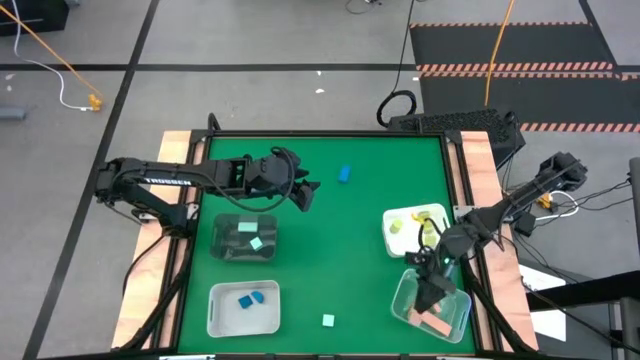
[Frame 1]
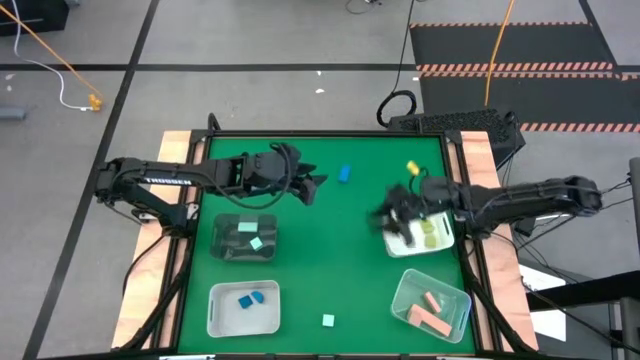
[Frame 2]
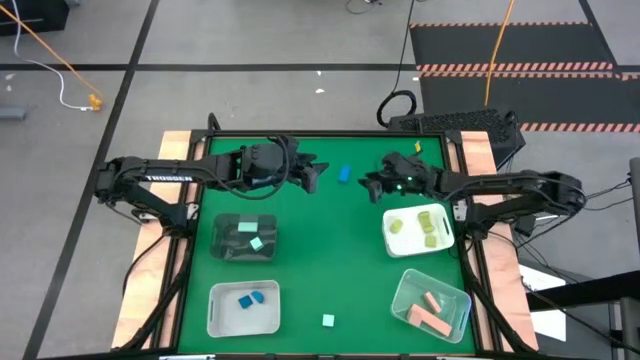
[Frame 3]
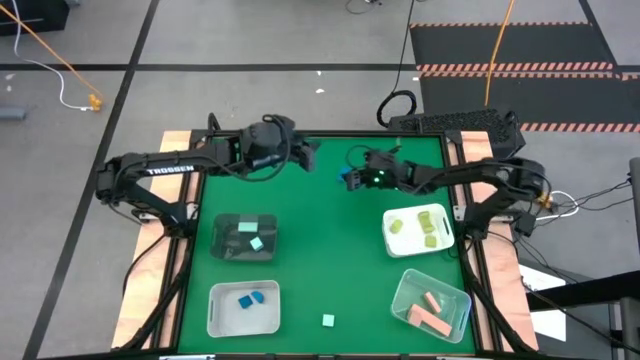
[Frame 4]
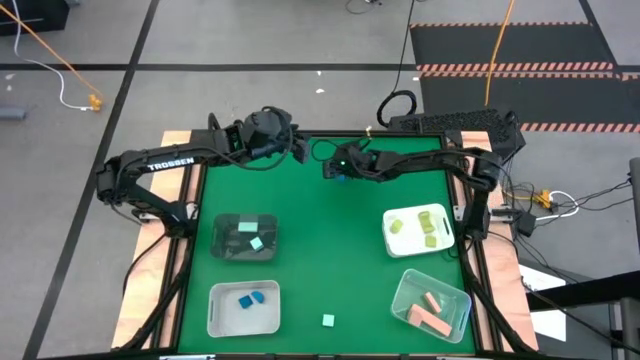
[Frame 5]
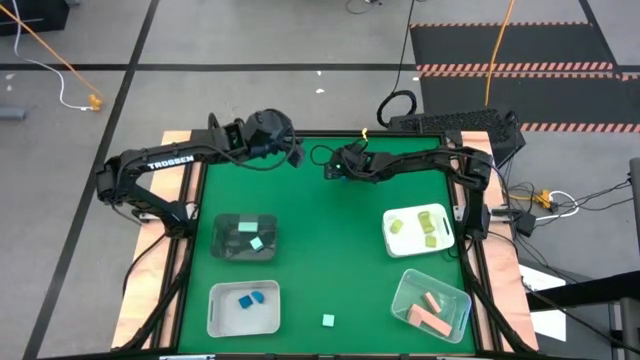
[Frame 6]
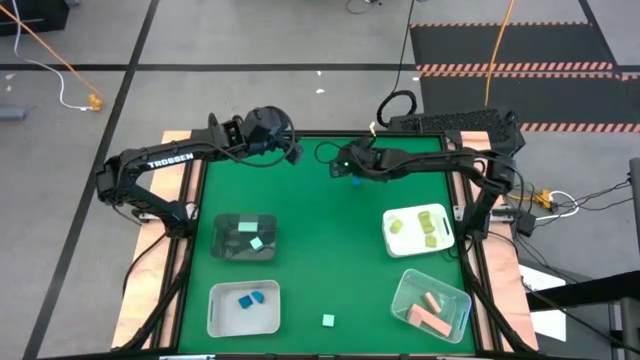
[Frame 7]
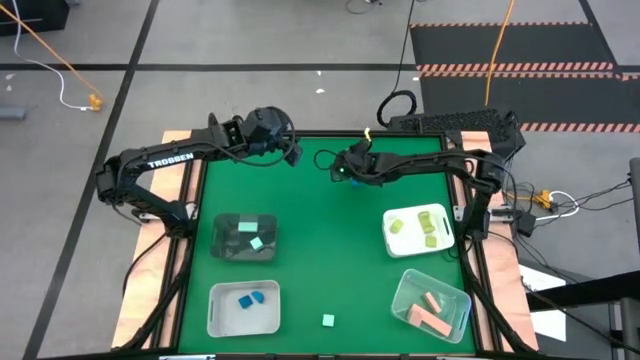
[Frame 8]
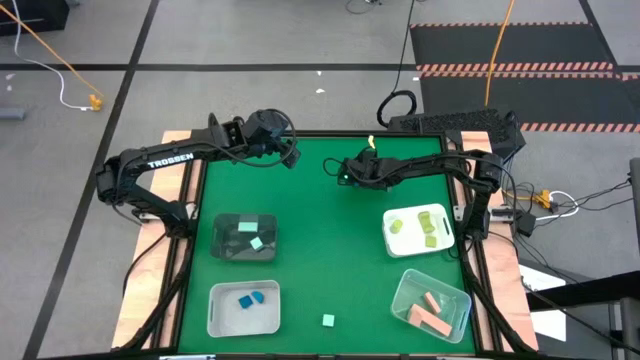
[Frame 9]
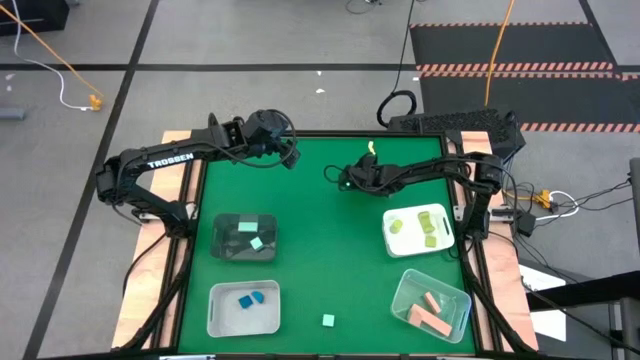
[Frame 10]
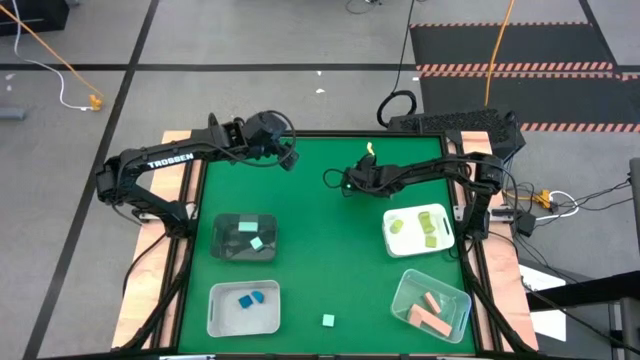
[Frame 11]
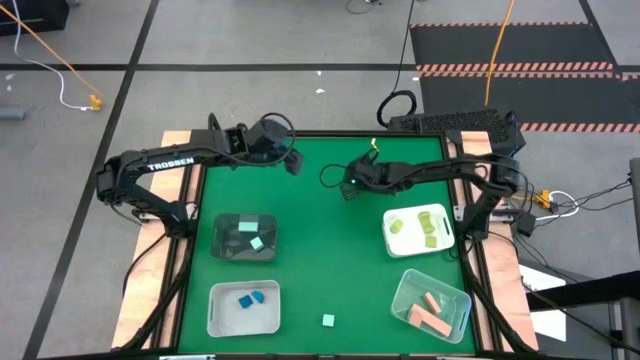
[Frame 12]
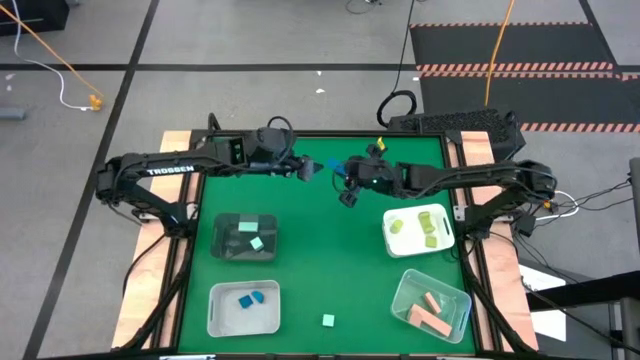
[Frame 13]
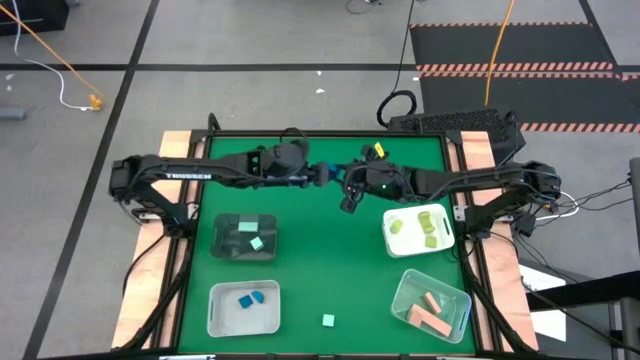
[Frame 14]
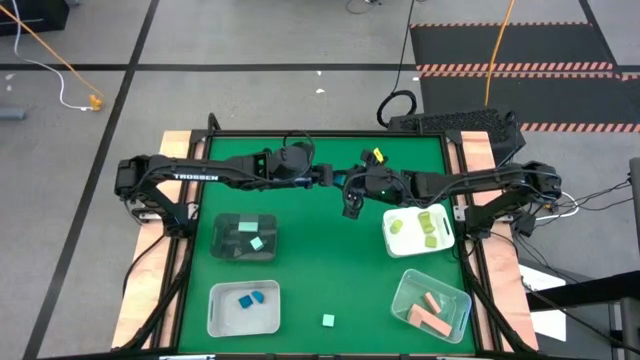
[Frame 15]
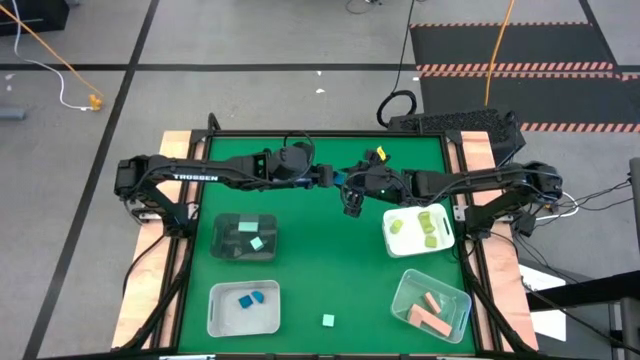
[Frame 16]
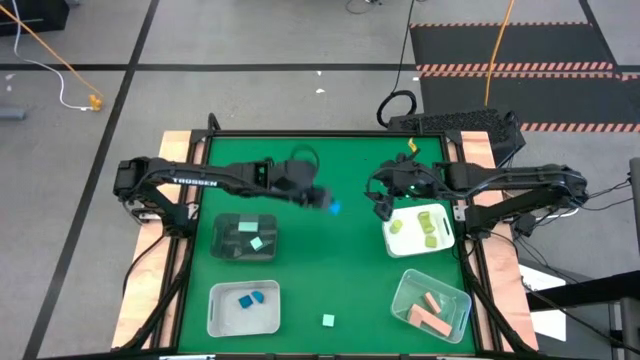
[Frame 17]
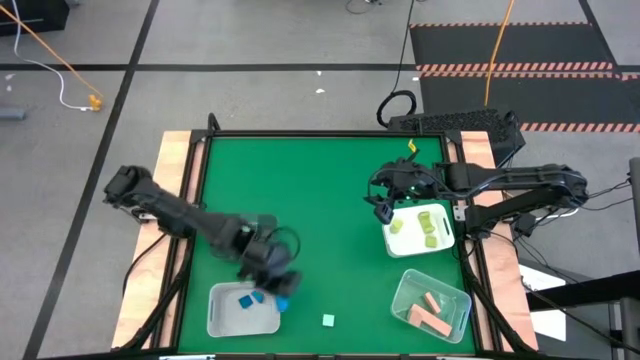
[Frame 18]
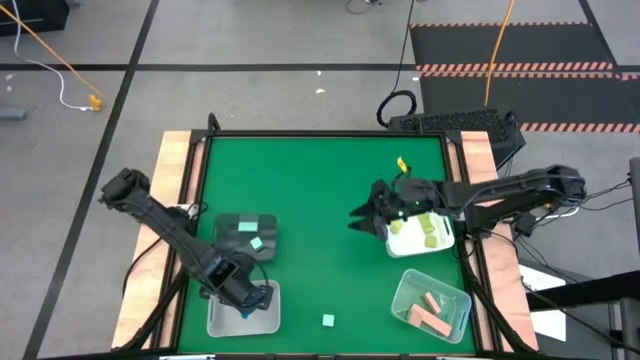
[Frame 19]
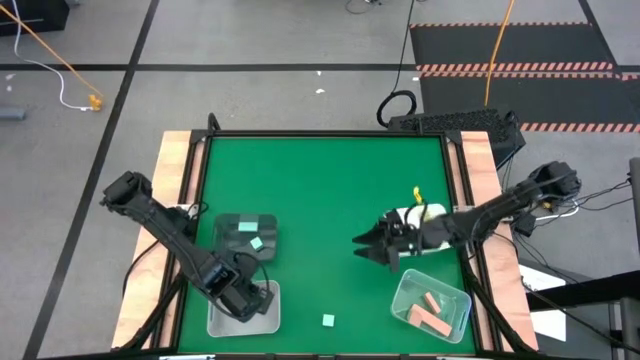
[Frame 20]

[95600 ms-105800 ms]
Task: Sort & place blocks by color
Put the blue block into the gray bin

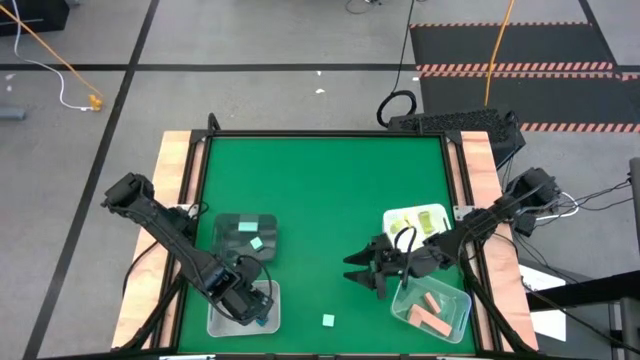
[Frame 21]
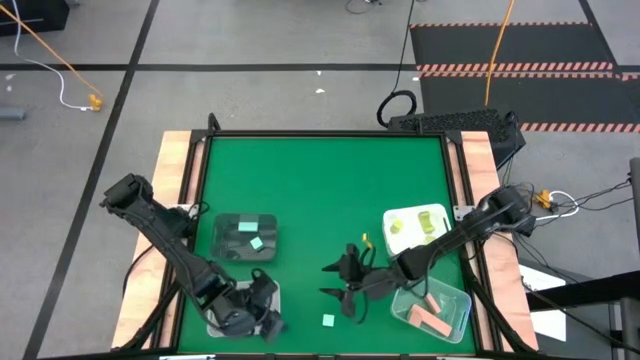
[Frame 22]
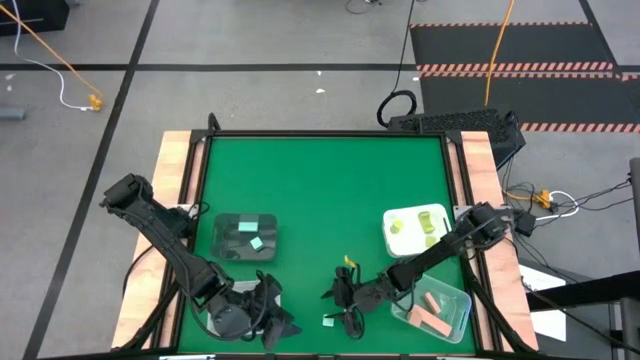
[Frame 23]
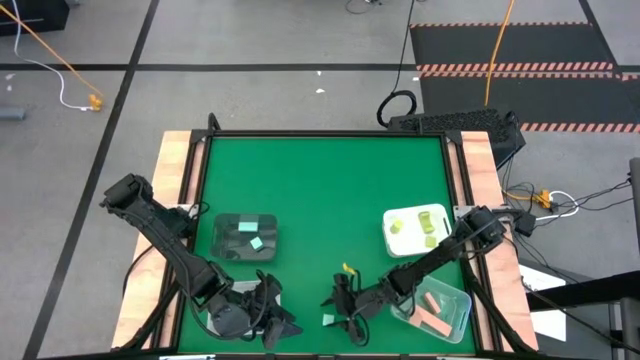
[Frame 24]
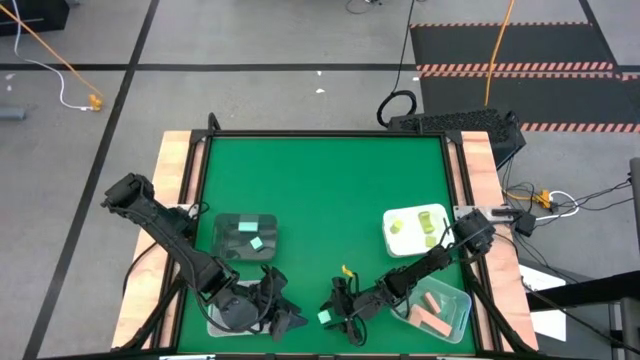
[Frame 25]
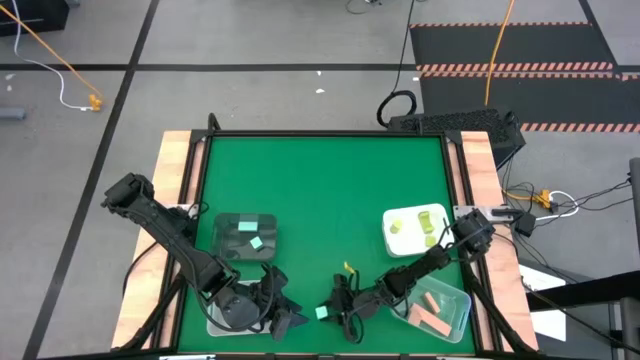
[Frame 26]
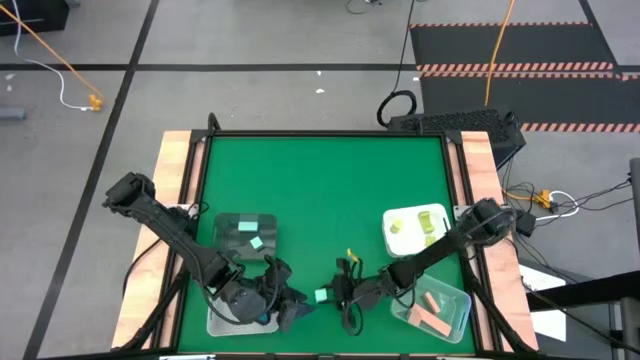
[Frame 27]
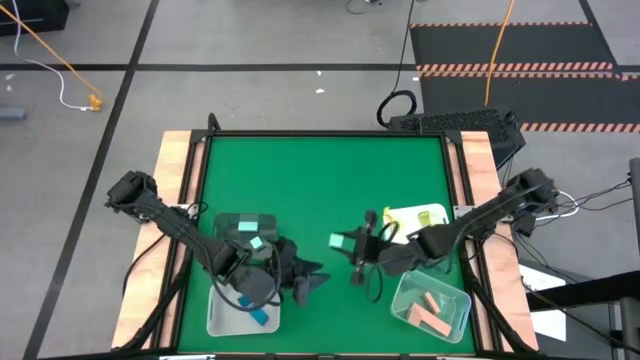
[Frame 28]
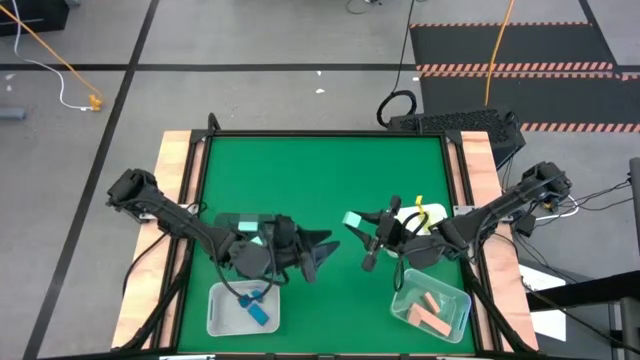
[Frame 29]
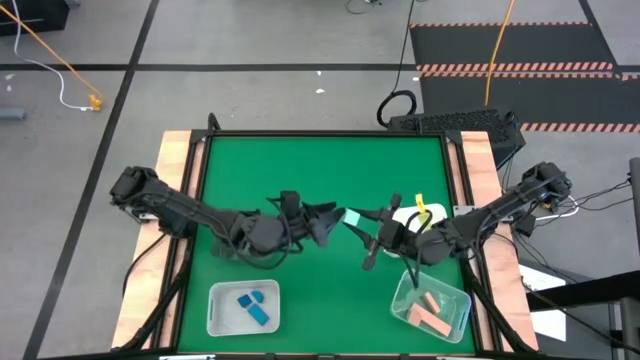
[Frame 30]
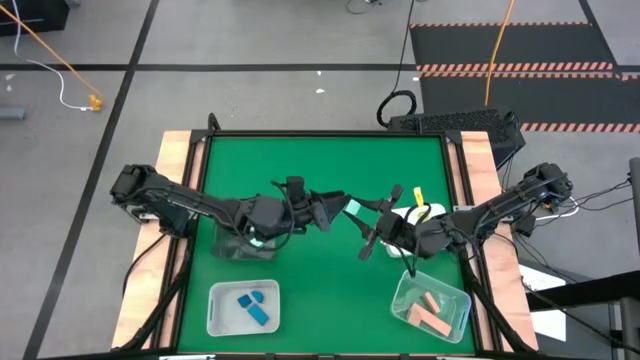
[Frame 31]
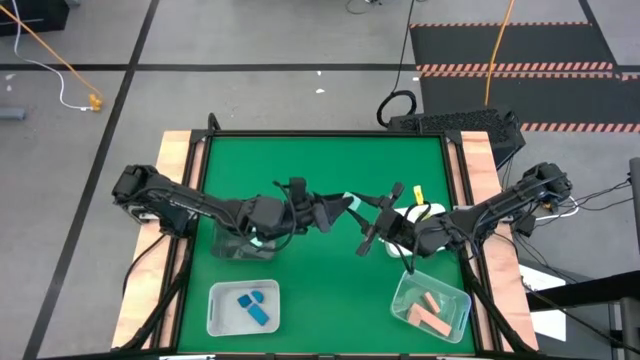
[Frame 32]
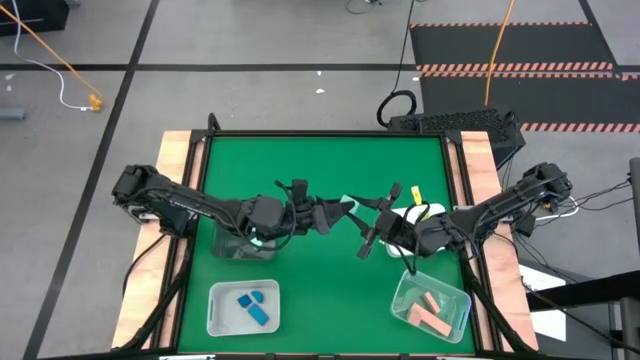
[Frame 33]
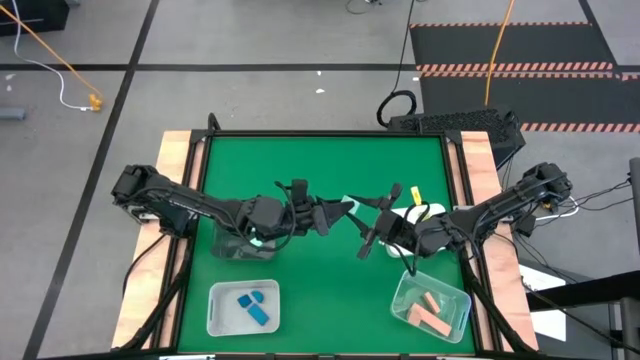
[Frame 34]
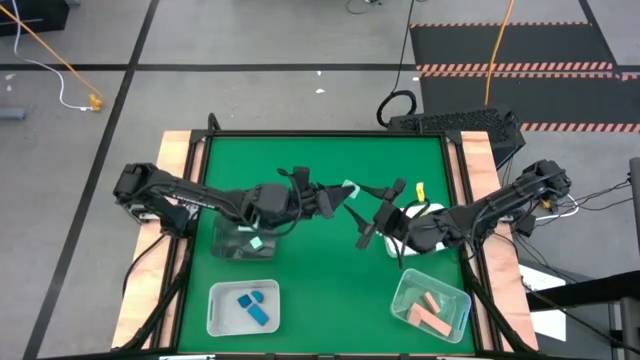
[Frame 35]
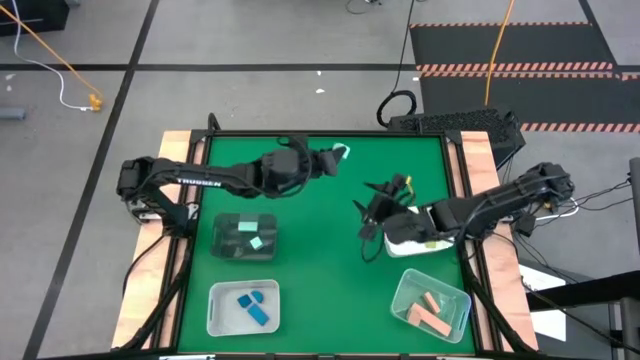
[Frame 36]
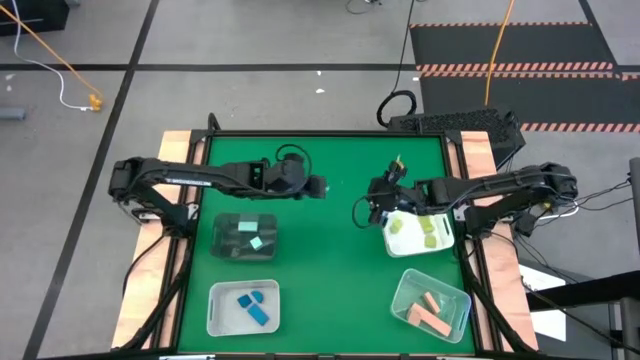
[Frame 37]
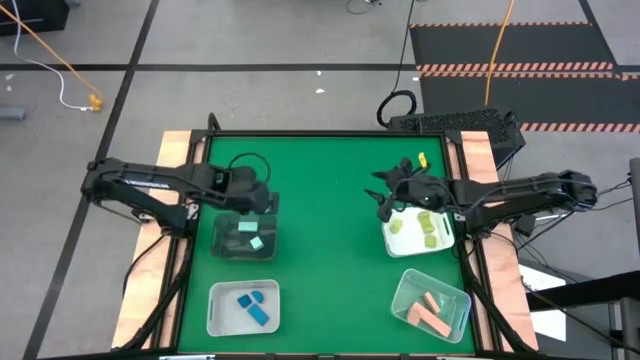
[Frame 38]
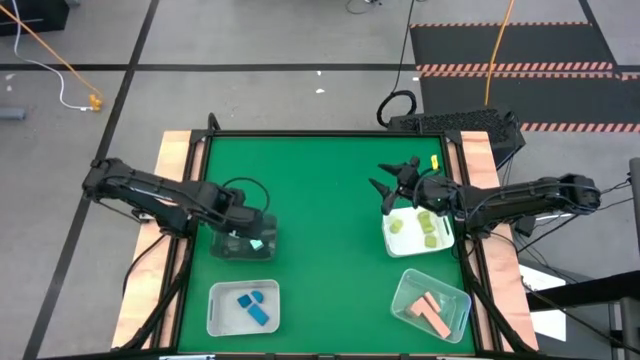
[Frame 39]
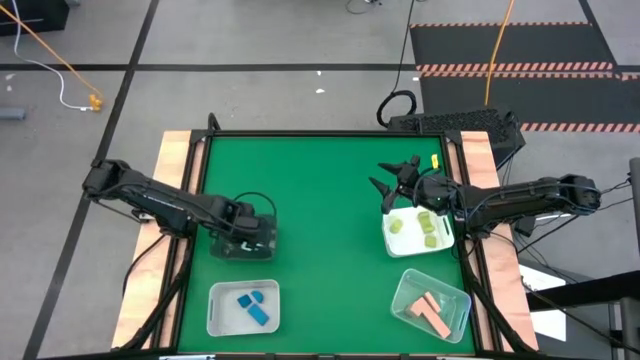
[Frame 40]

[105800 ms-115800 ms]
Put the light blue block into the black bin

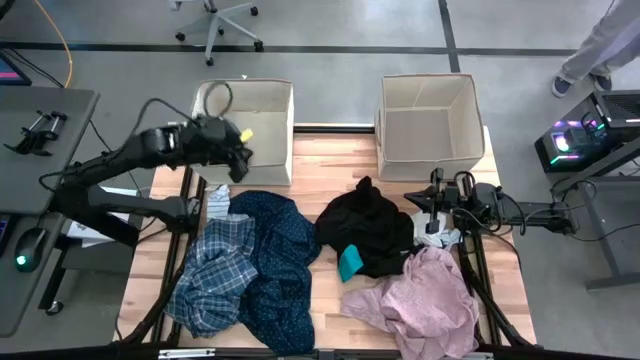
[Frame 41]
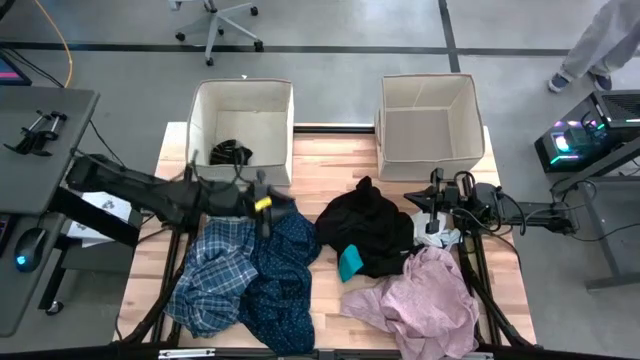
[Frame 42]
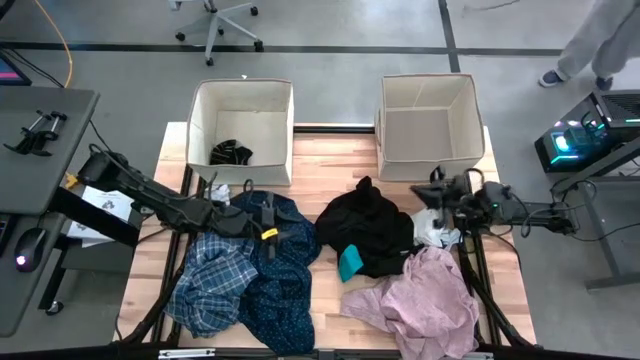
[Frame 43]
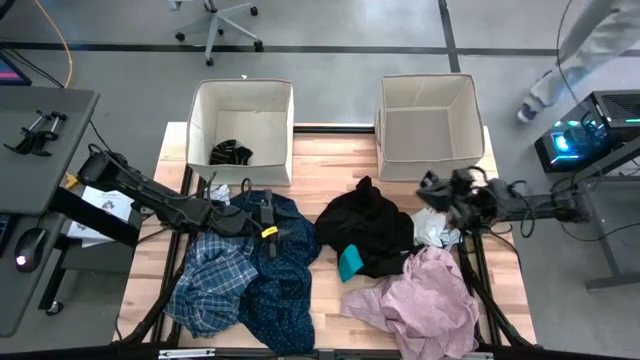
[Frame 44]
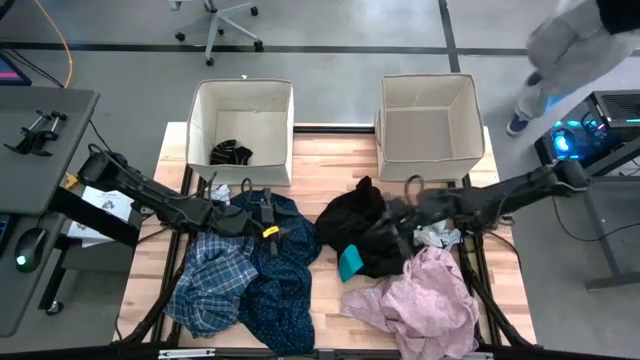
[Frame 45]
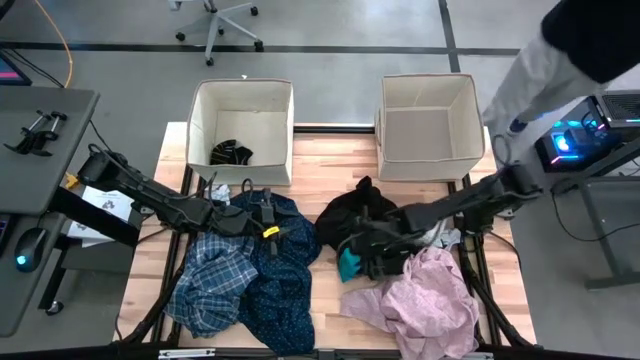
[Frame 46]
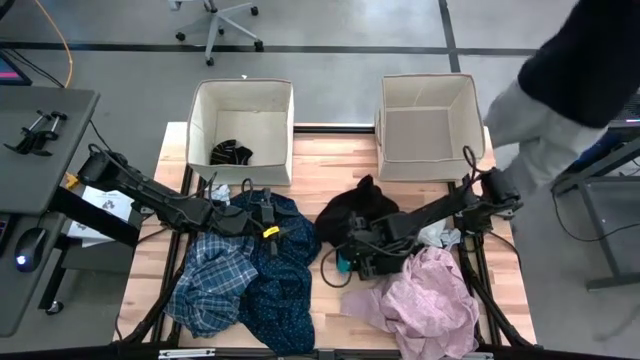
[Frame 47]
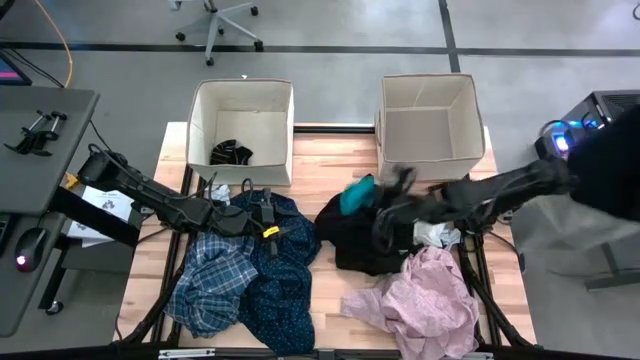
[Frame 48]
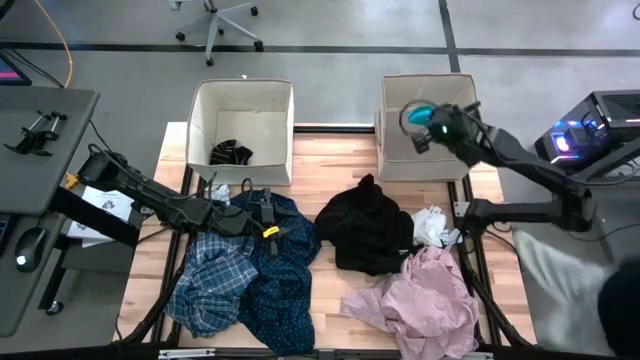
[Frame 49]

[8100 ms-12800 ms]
Task: Sort clothes
Put the blue sock into the right laundry bin
